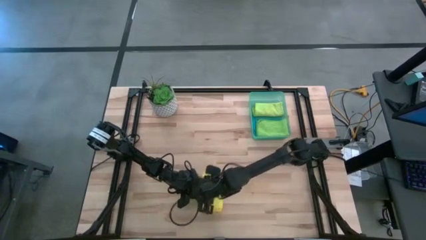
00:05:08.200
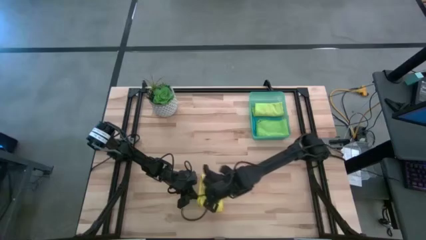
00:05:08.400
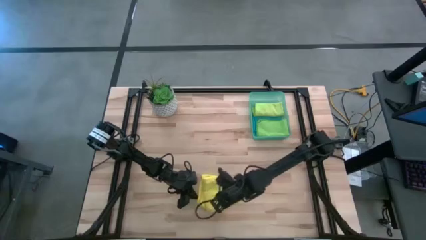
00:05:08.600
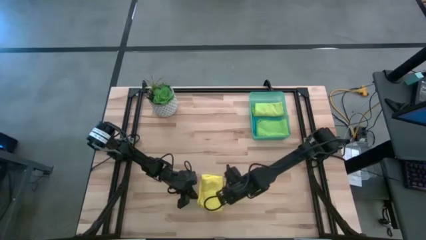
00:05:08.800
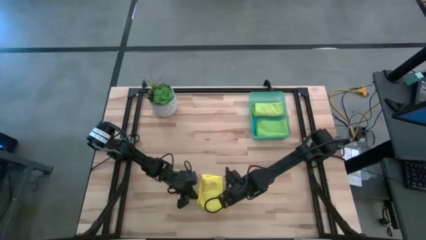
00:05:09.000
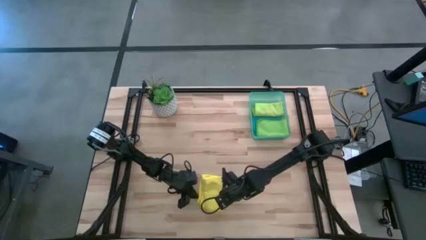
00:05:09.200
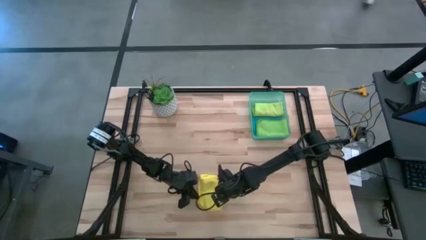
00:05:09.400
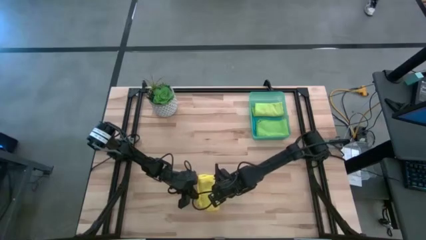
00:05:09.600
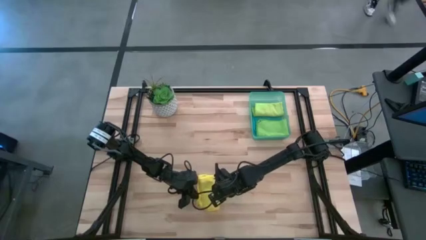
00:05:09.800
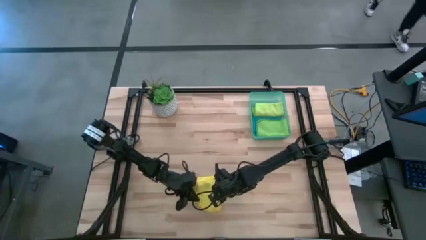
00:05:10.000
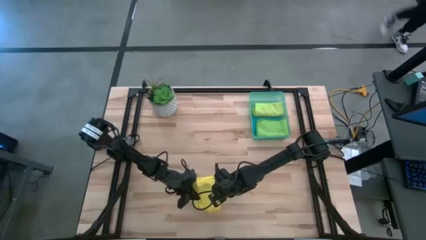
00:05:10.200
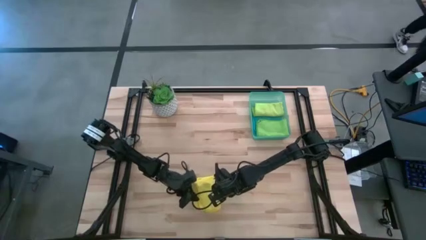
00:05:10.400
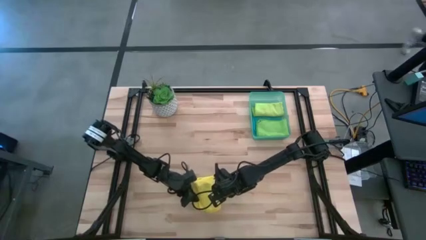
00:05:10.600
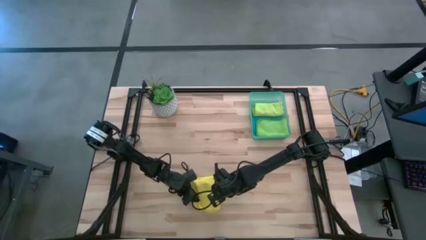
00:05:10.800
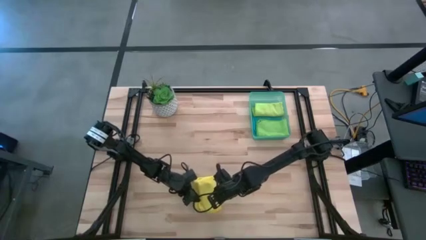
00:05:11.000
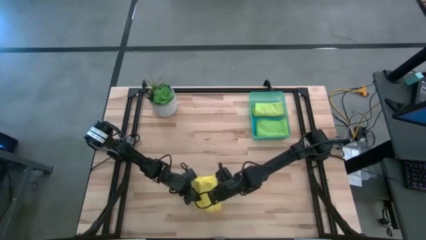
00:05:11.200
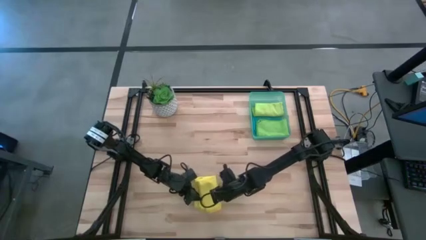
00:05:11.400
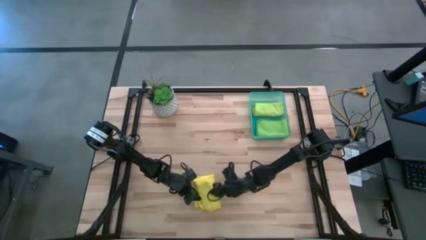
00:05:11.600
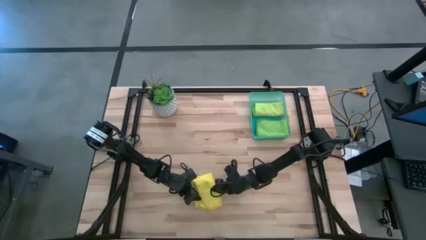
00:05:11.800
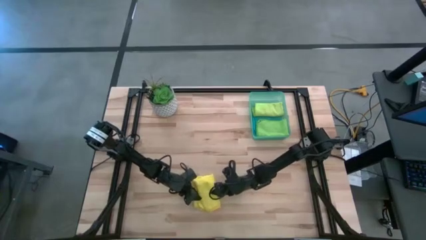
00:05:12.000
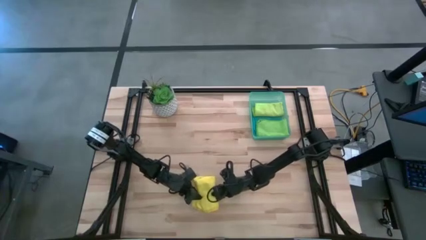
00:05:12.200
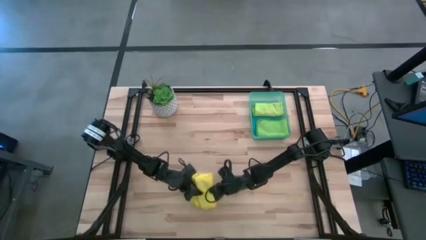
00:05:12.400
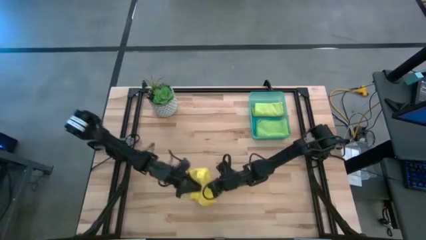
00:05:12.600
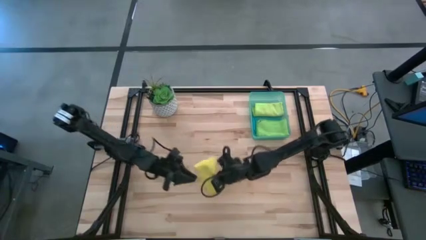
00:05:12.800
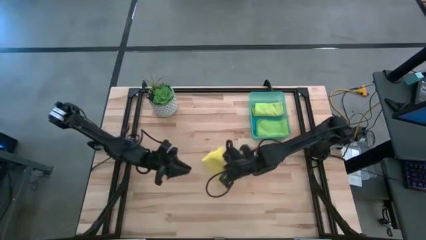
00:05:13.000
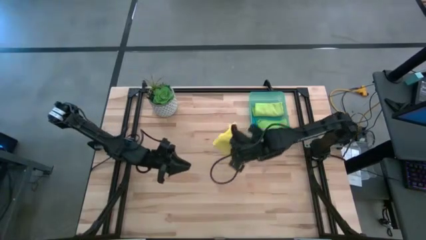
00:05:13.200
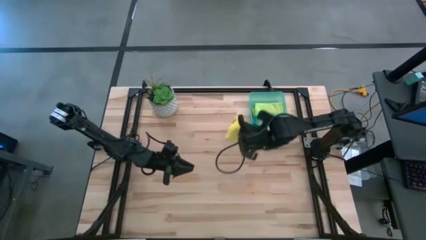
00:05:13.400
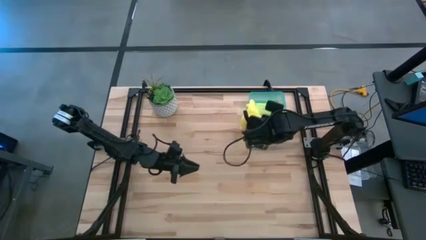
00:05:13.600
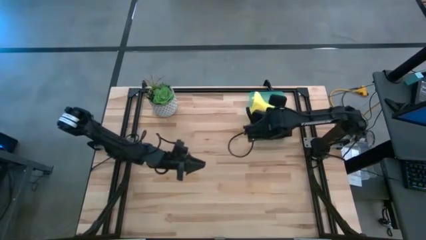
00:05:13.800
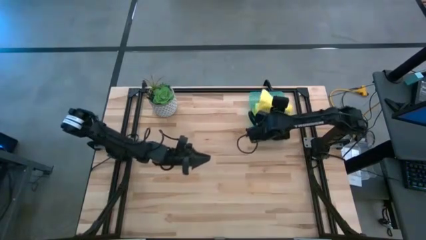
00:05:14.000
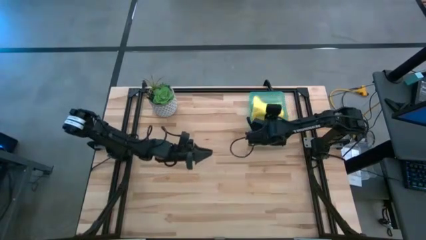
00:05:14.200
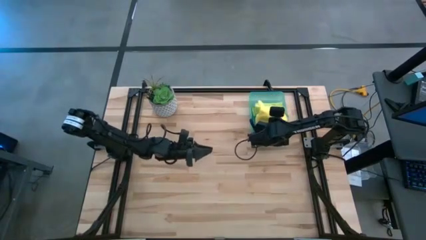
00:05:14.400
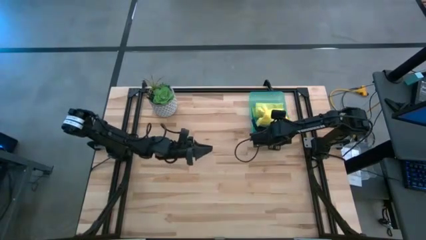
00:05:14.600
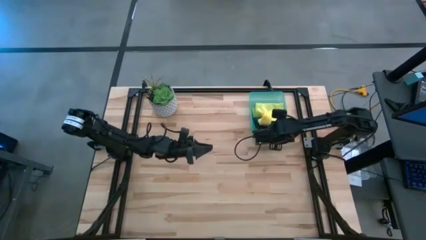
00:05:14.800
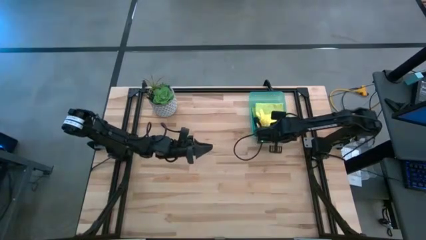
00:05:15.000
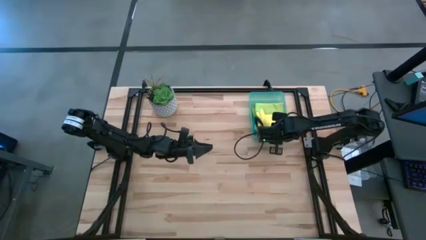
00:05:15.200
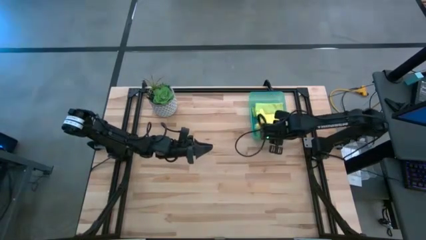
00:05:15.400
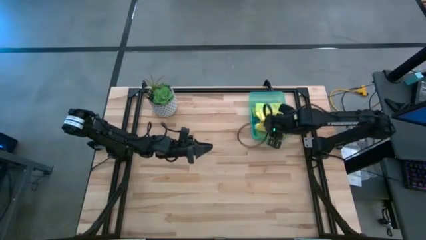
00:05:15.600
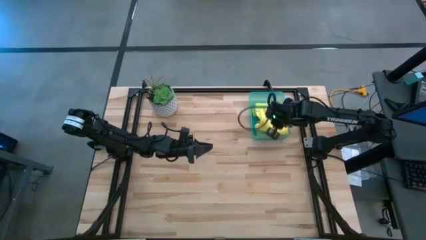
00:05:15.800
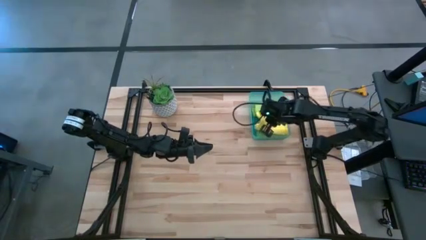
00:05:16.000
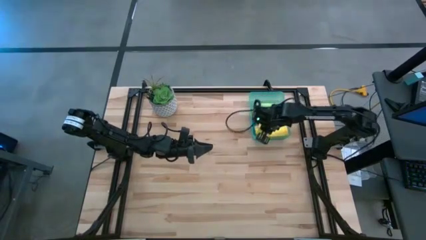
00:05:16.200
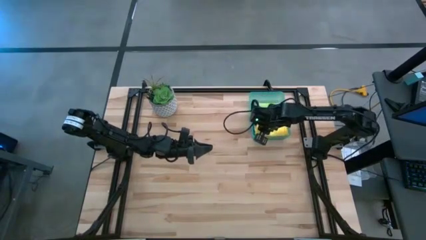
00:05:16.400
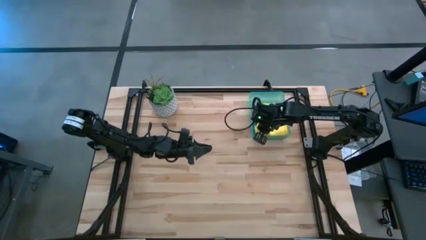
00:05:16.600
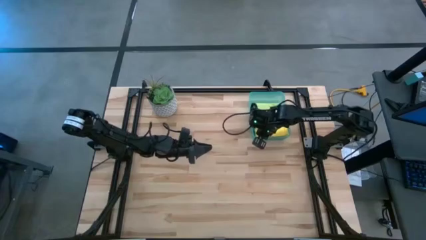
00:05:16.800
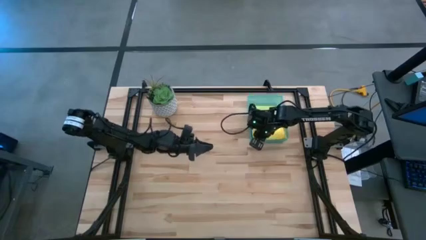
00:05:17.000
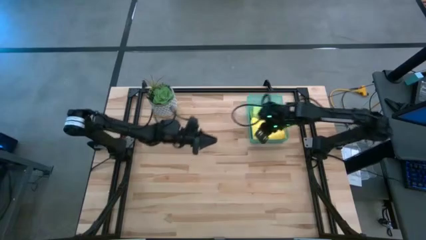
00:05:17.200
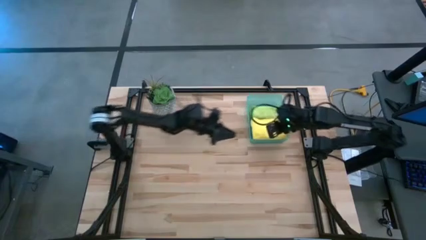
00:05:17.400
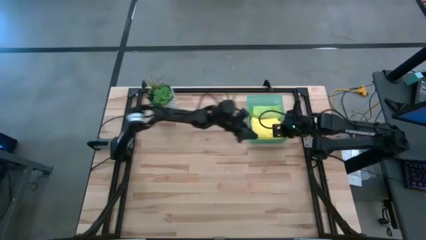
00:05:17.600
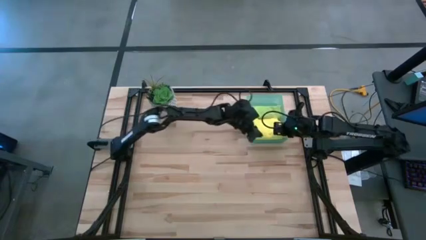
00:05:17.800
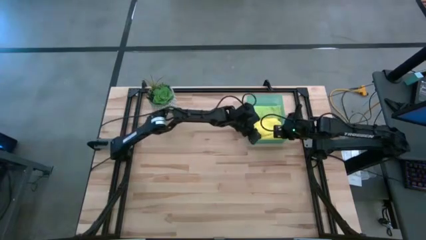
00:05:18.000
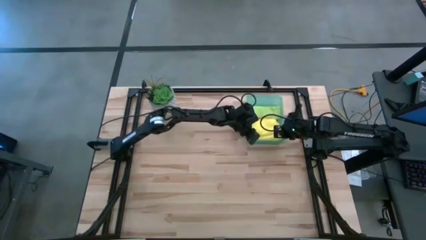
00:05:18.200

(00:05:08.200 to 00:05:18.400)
Task: Fold microfiber towels
Put the yellow towel on top of the towels in the container

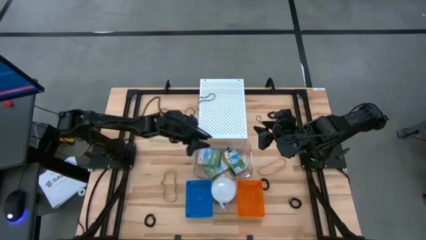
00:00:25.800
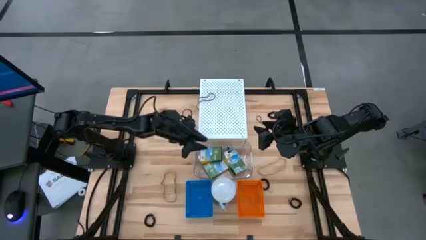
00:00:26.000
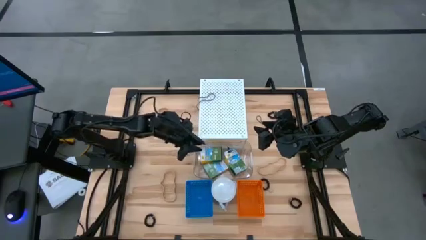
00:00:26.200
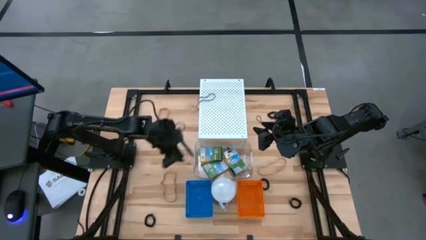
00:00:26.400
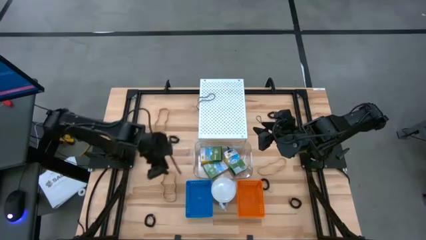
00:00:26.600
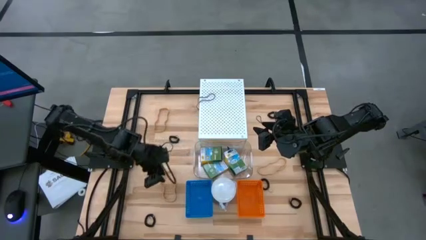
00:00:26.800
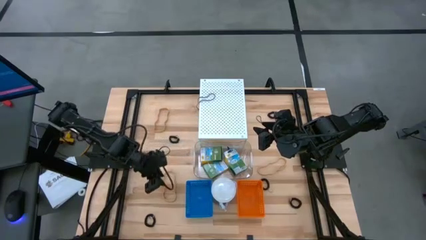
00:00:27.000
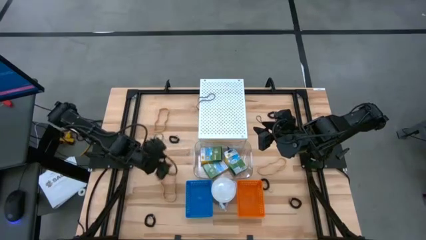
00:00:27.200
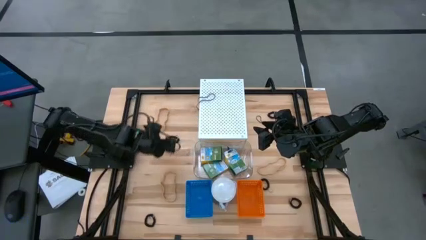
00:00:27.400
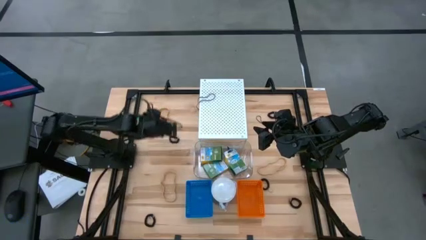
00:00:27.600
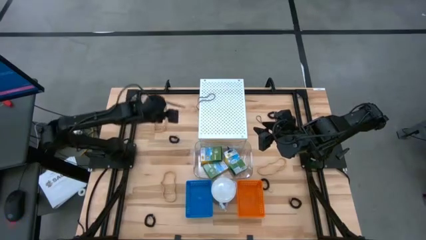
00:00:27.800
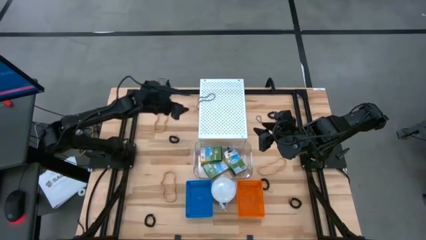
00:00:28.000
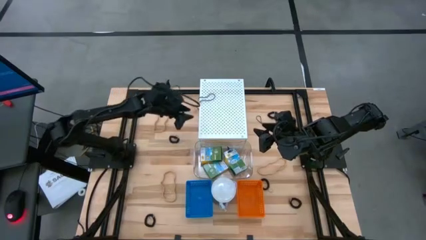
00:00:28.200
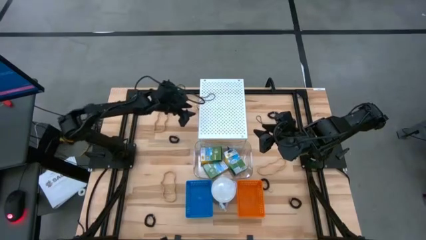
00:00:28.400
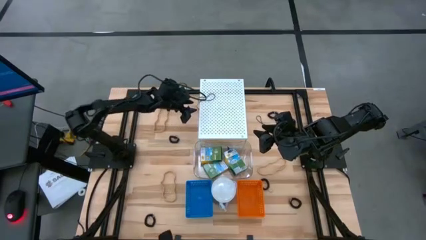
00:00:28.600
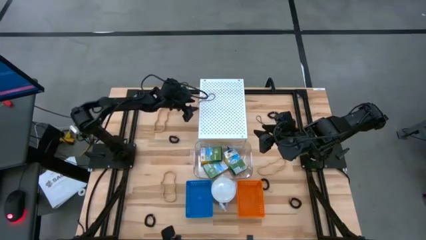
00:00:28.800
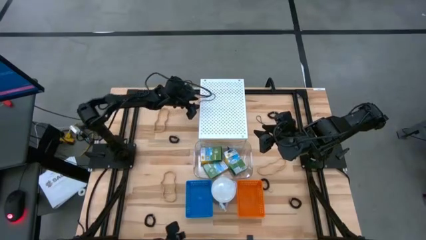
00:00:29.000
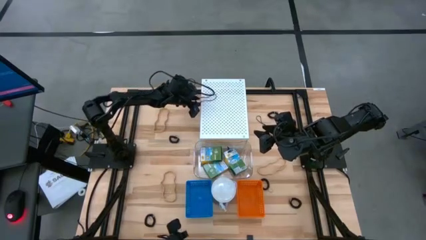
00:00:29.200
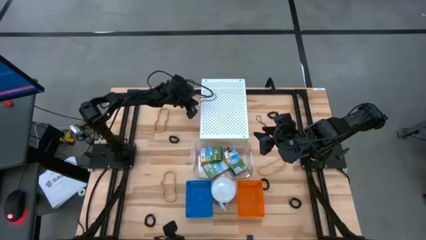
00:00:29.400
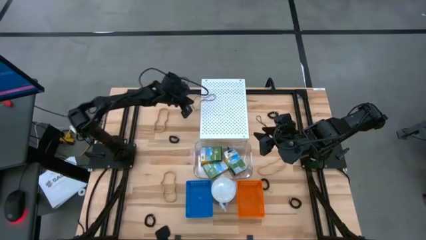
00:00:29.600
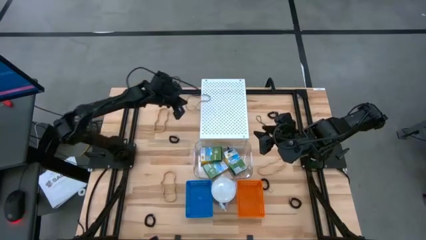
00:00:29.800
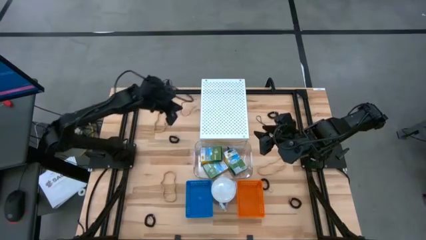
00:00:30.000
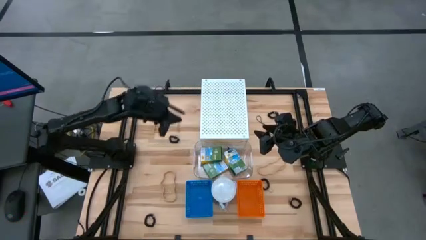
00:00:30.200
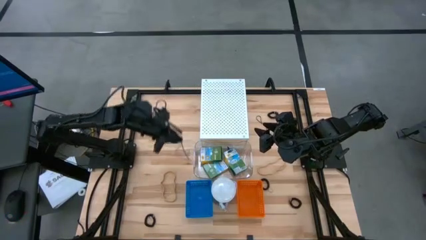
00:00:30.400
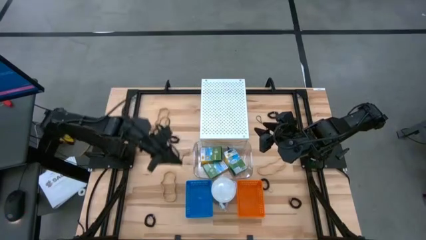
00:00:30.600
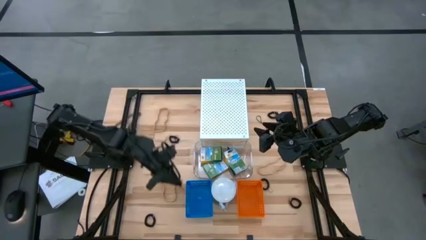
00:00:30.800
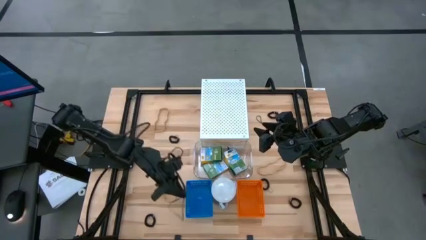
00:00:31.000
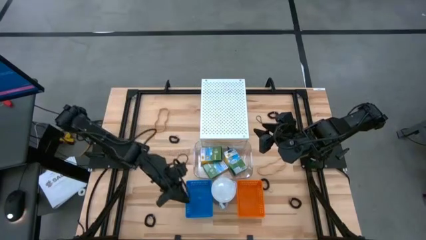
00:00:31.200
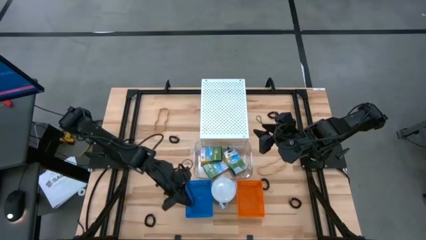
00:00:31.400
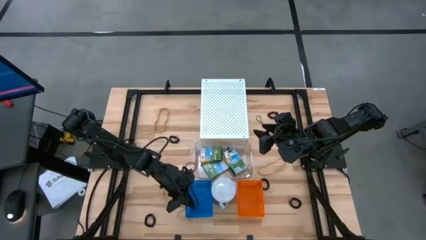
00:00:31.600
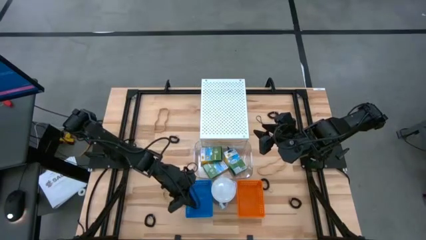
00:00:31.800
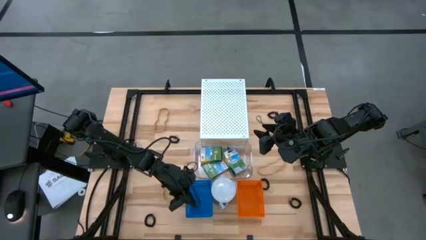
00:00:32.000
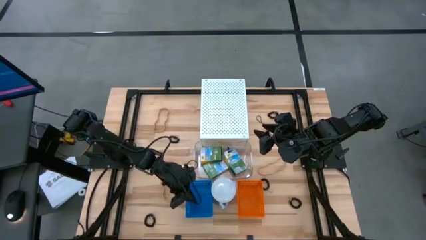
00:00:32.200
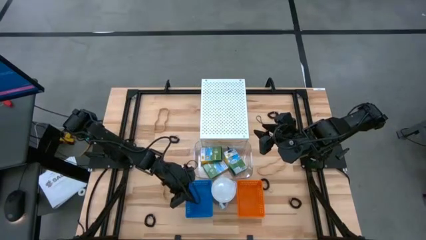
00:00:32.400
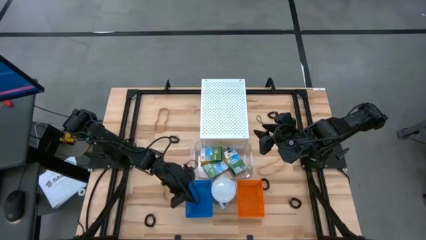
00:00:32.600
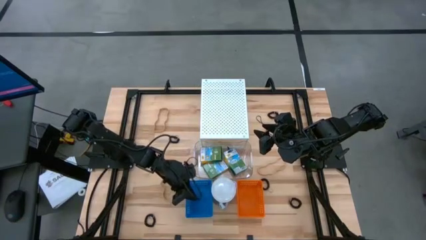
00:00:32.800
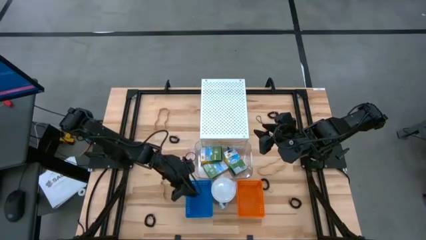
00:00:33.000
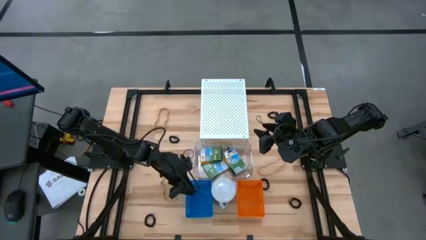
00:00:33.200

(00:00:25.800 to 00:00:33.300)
Task: Pick & Place Office Desk Supplies
Put the black rubberband into the blue bin
